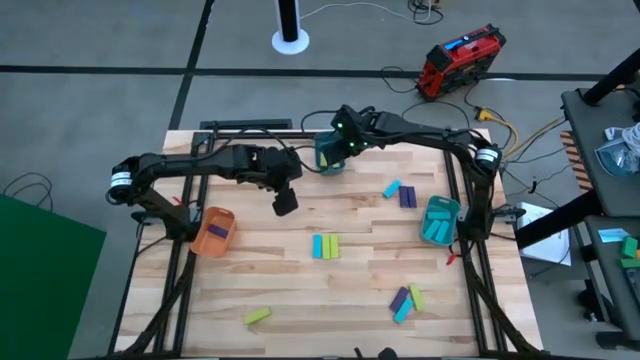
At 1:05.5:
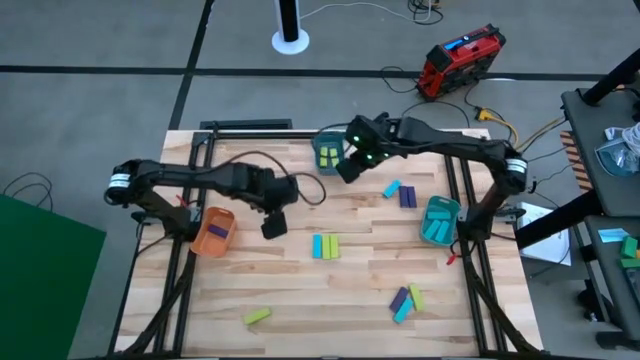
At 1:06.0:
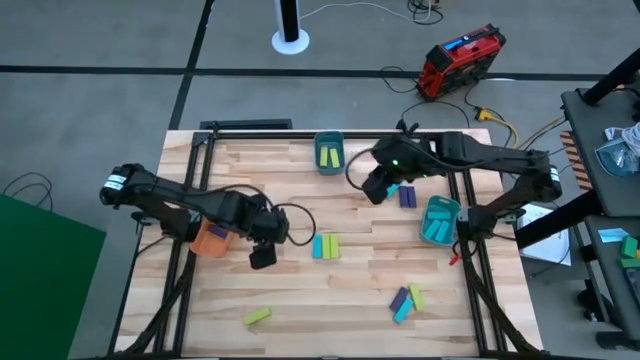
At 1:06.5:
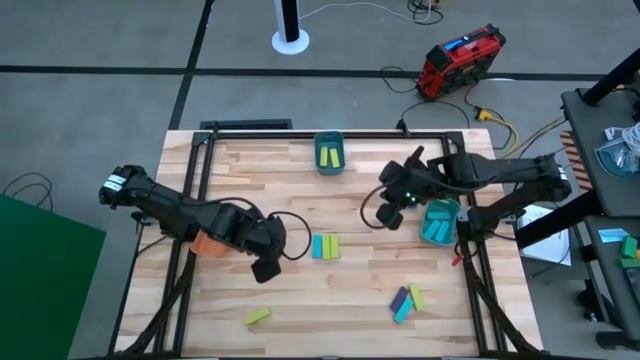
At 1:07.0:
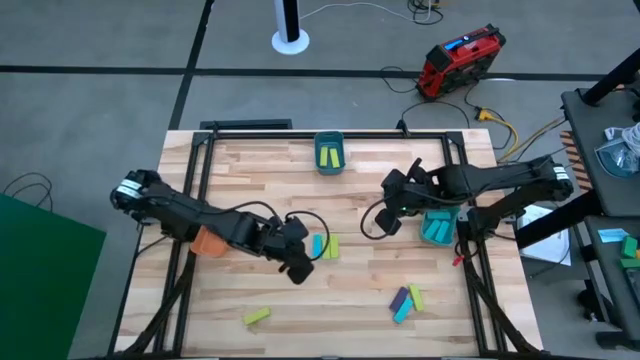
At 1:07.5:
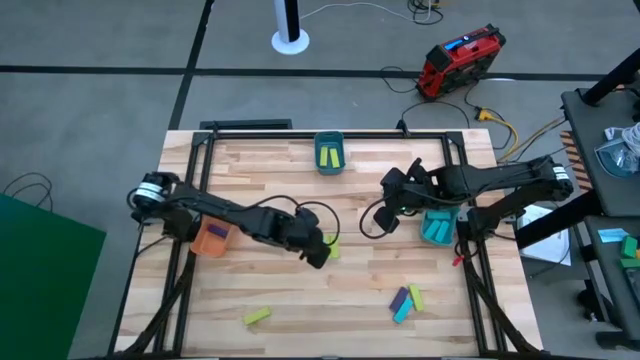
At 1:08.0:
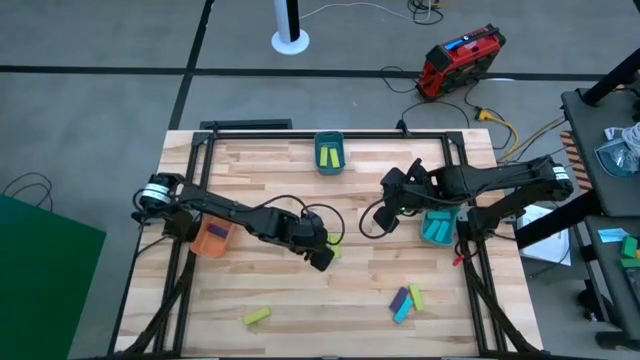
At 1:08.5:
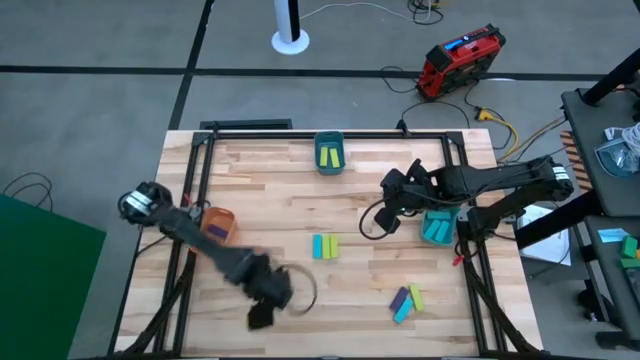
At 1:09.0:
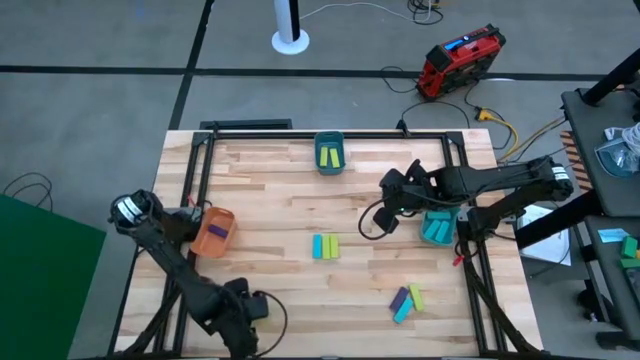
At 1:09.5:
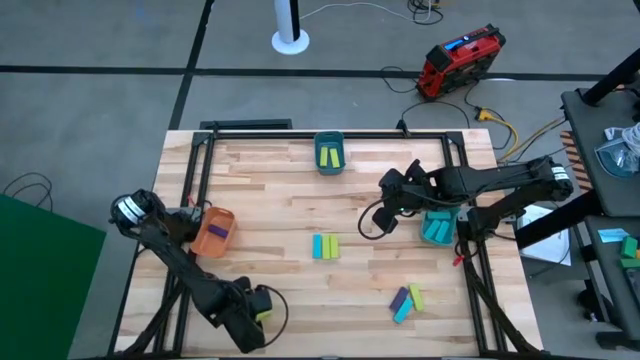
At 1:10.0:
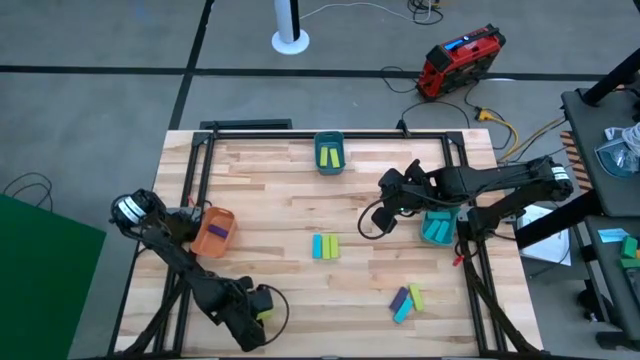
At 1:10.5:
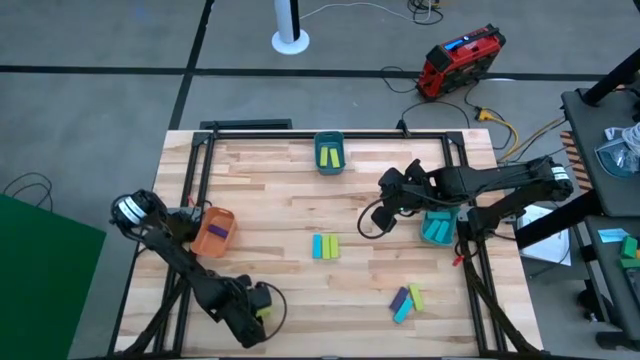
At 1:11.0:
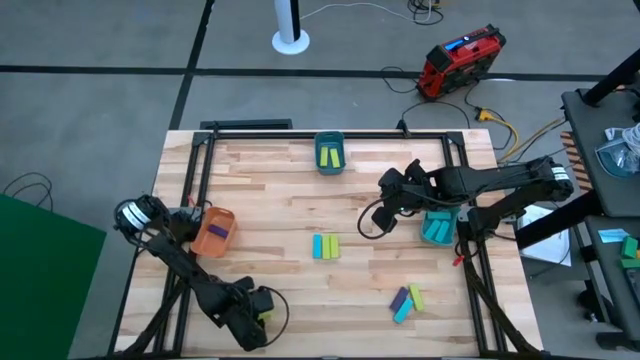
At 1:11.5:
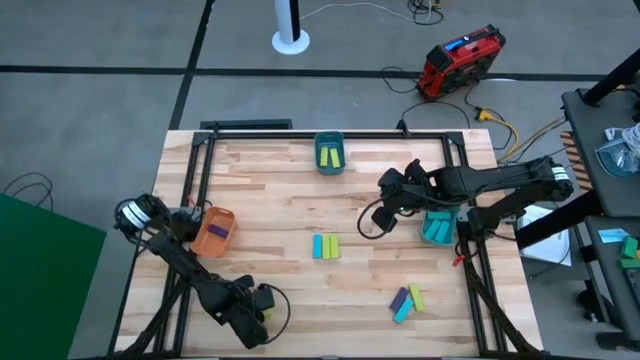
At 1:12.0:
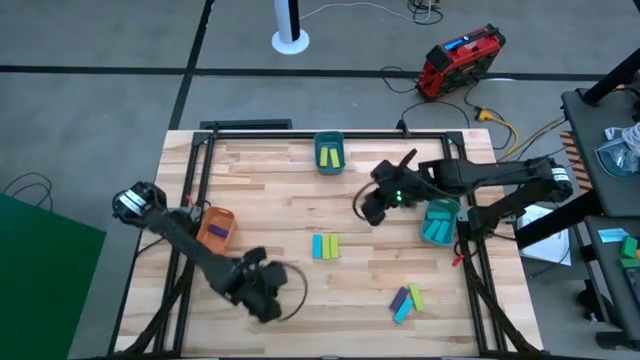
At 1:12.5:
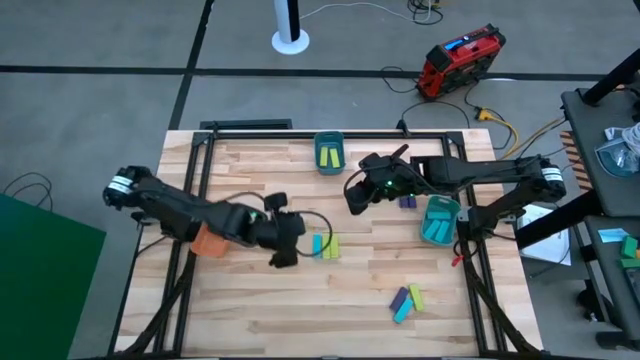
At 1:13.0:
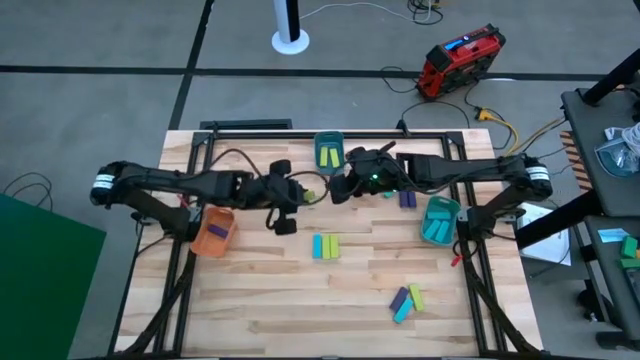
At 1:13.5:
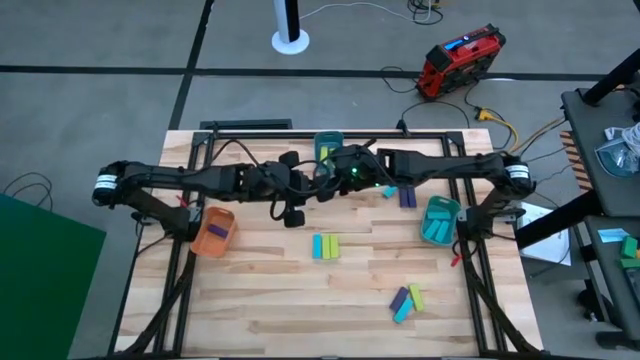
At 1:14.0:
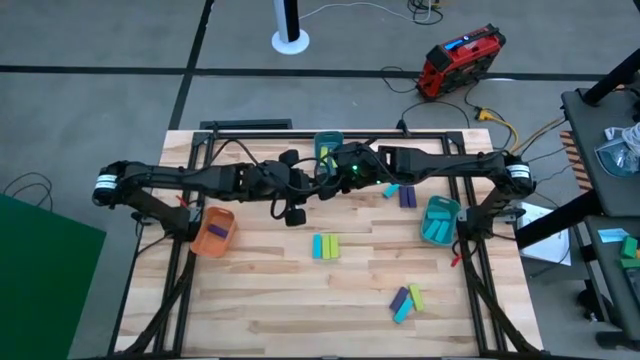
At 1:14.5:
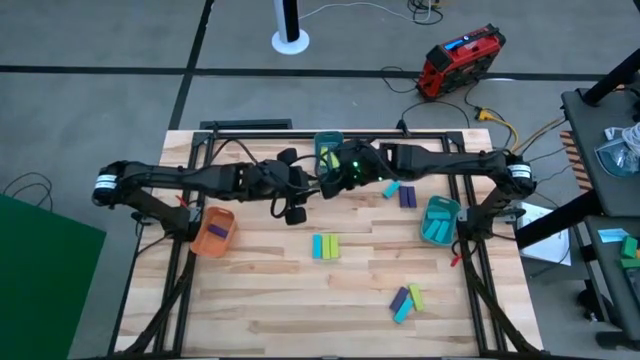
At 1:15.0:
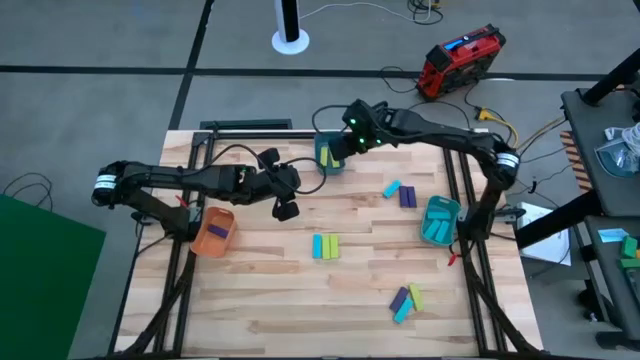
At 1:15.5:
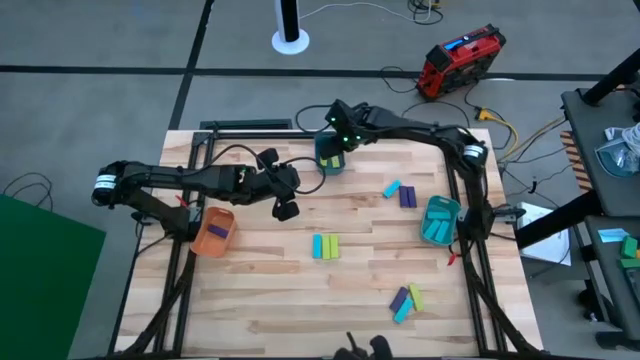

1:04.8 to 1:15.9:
Task: Sort blocks
Put the green block into the blue bin

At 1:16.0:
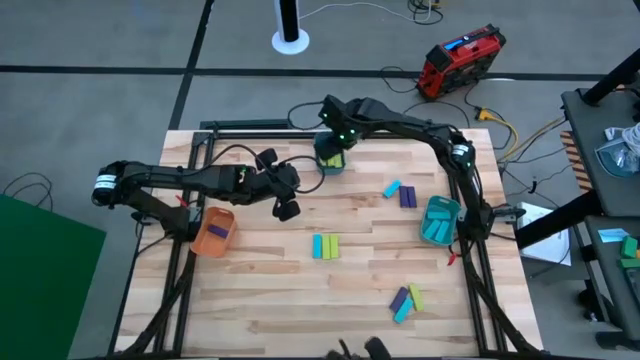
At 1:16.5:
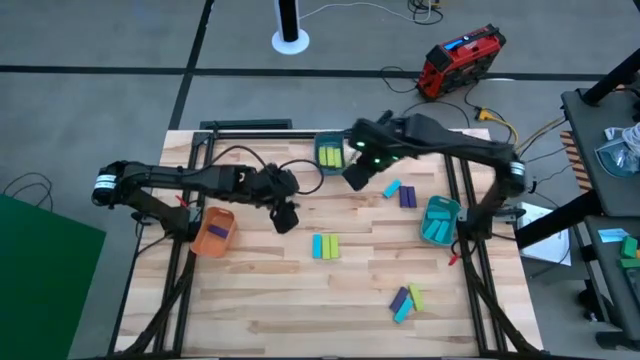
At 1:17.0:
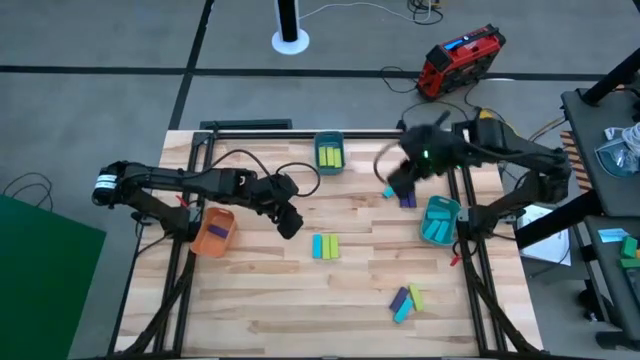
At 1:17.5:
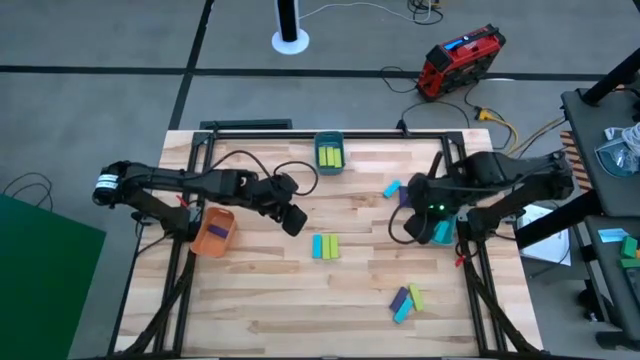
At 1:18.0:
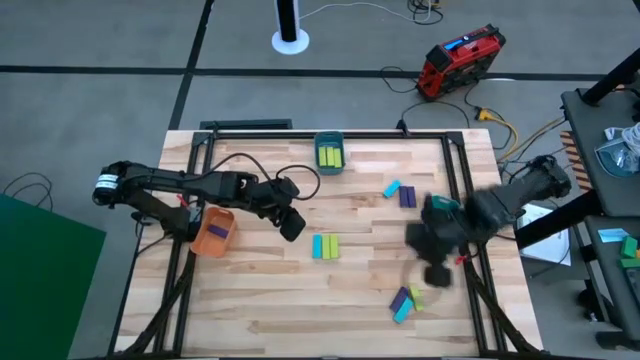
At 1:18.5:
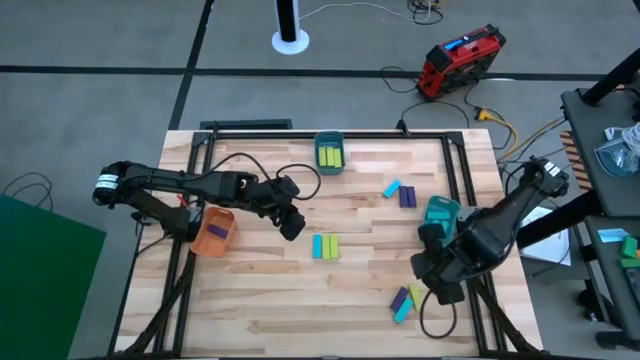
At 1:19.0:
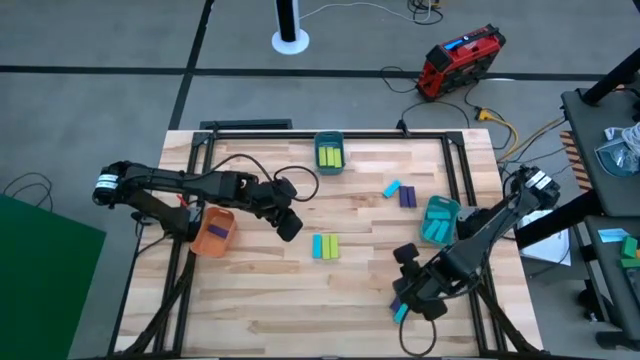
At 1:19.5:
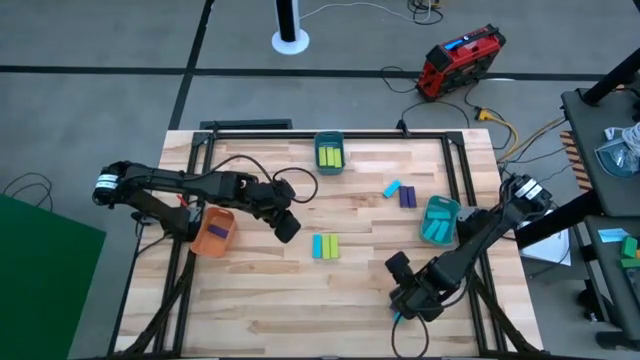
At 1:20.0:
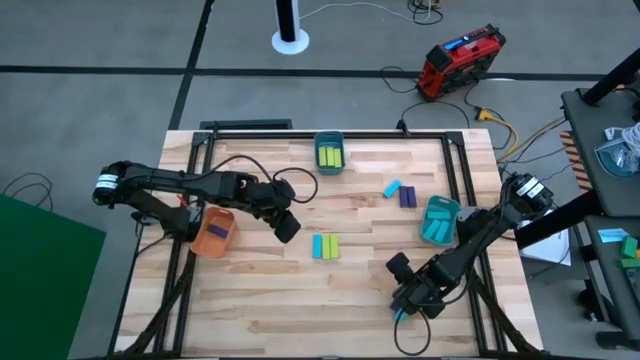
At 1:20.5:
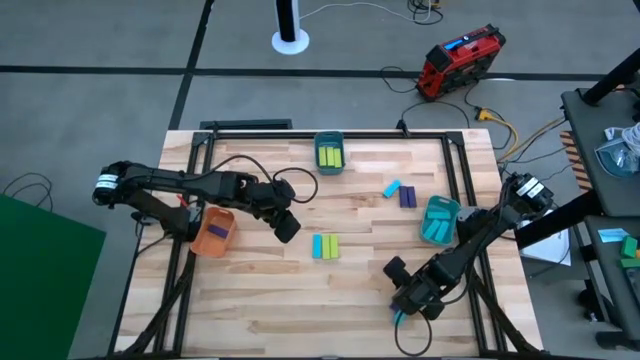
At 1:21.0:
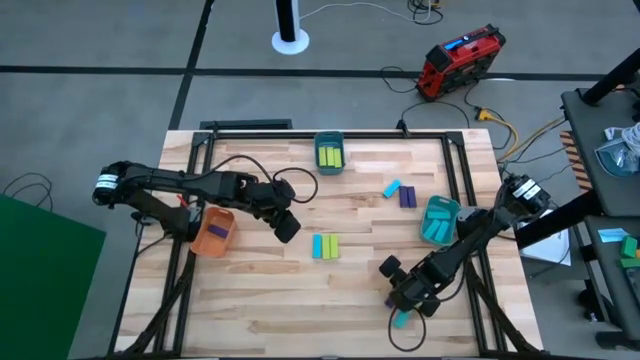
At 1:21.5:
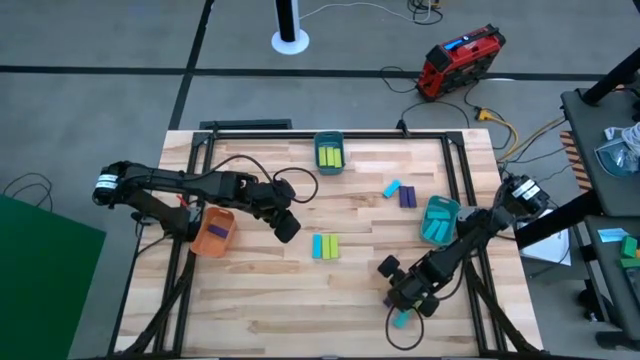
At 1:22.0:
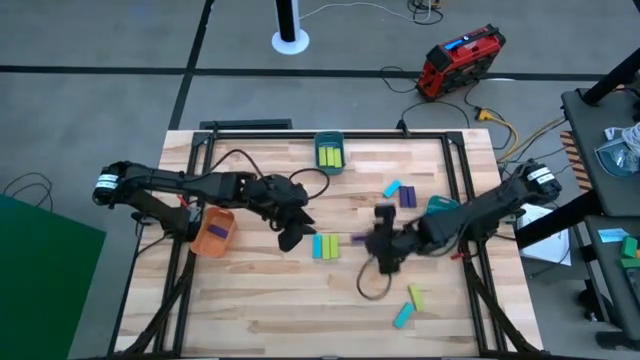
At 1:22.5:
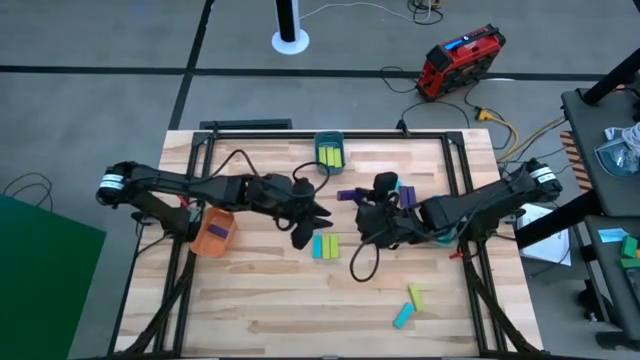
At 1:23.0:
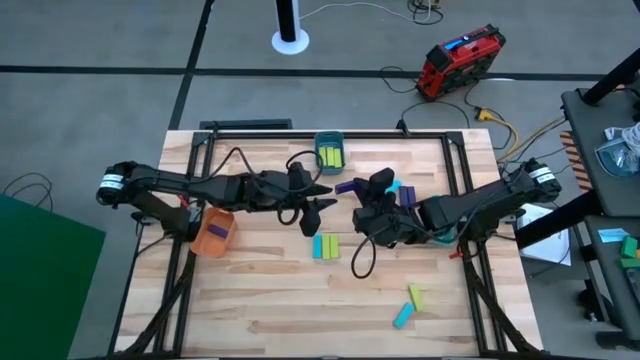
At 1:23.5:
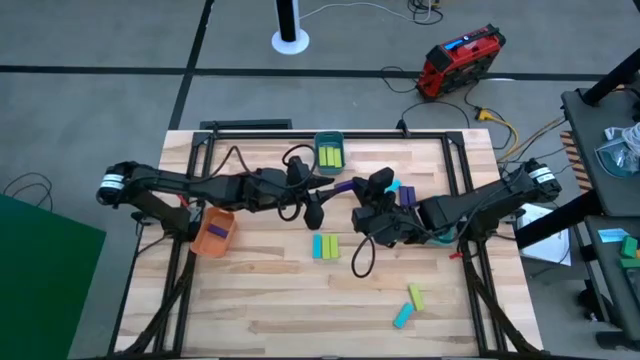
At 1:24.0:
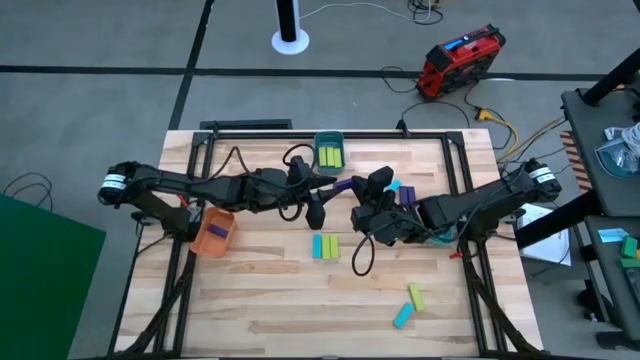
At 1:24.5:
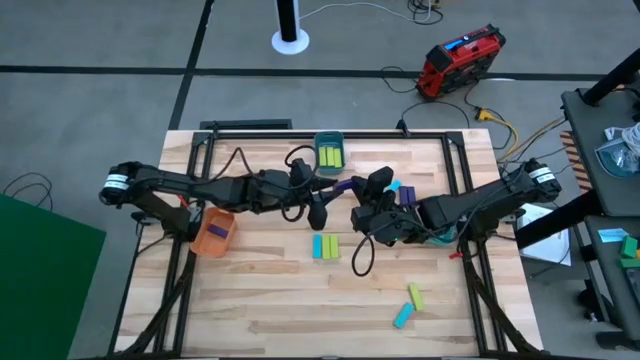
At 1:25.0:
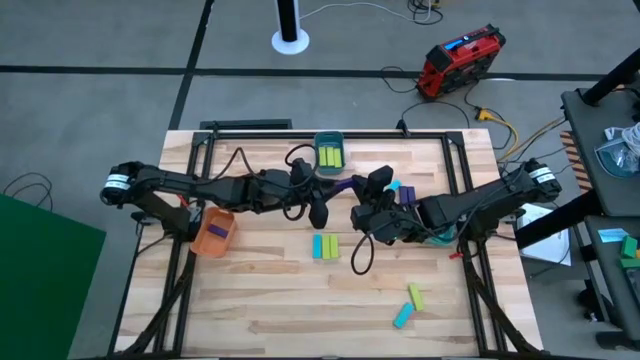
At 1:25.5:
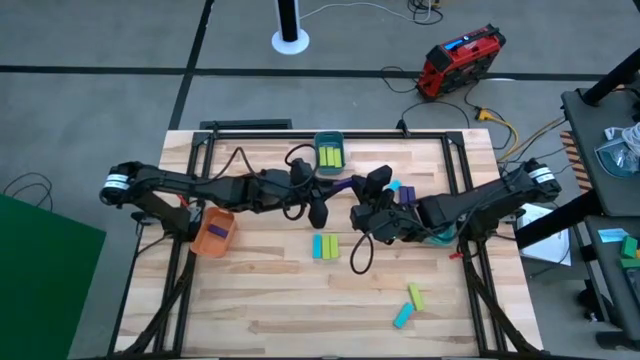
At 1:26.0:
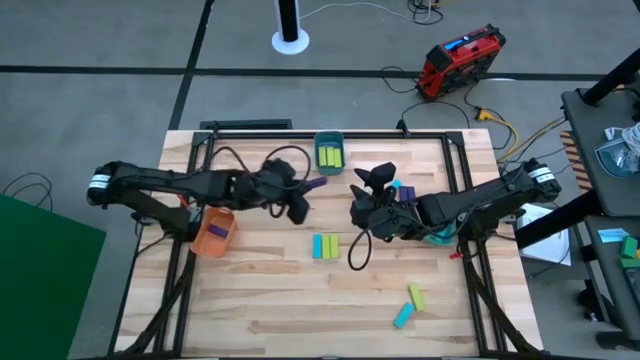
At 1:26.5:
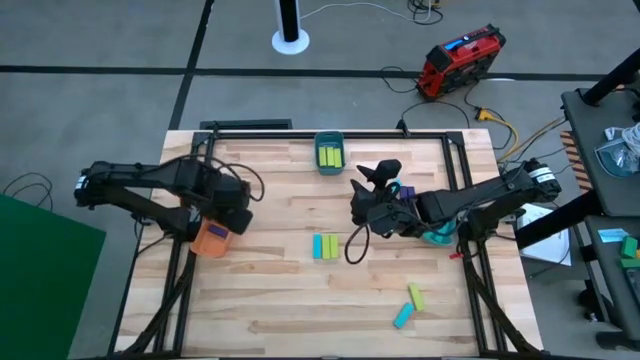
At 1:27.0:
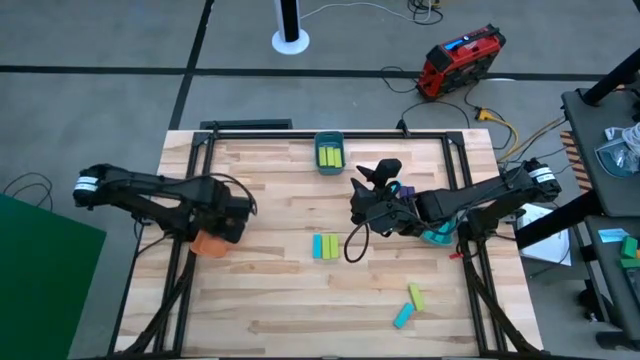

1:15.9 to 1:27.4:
Put the violet block into the orange bin
